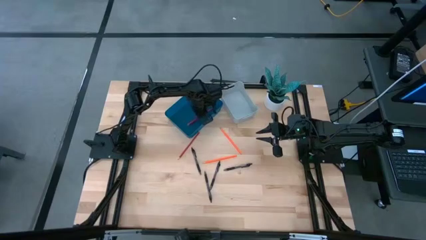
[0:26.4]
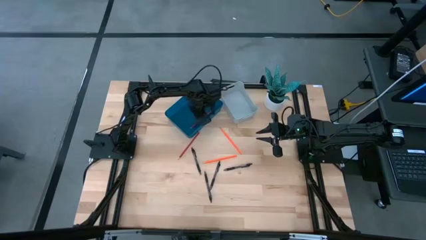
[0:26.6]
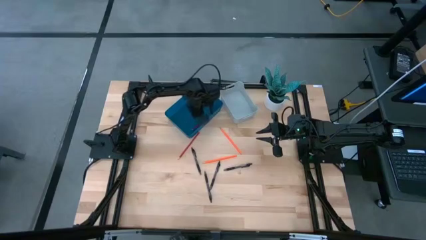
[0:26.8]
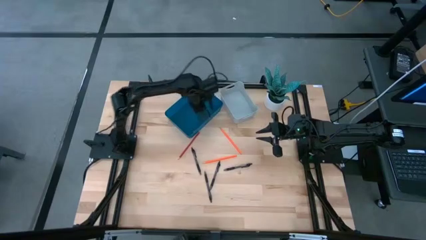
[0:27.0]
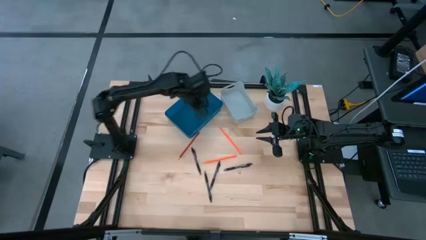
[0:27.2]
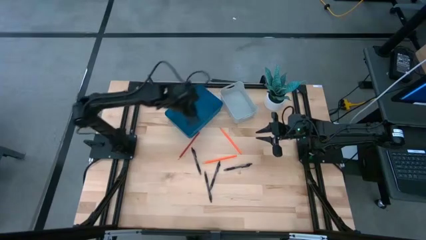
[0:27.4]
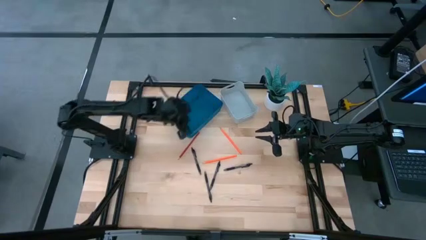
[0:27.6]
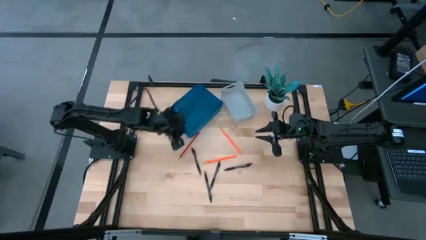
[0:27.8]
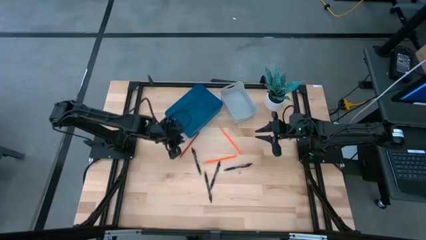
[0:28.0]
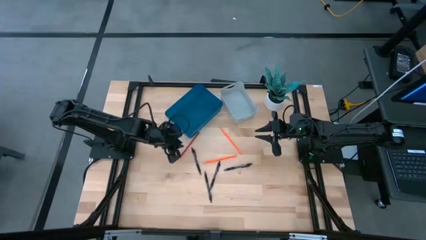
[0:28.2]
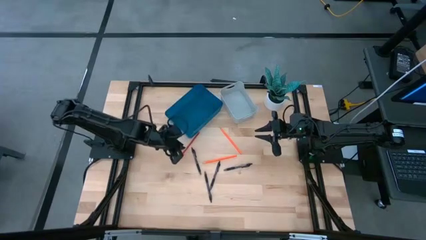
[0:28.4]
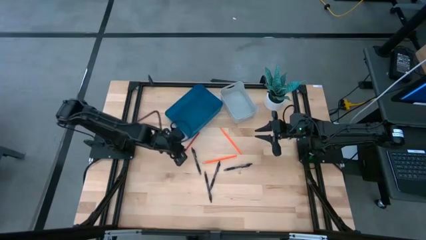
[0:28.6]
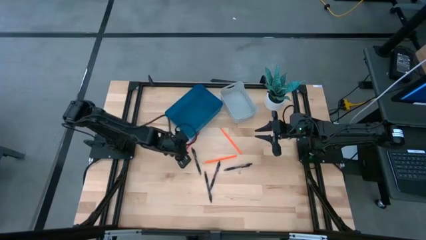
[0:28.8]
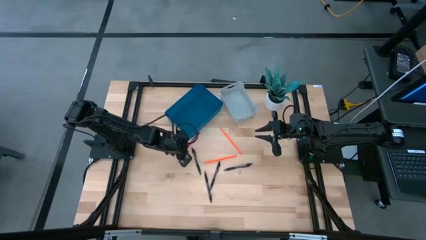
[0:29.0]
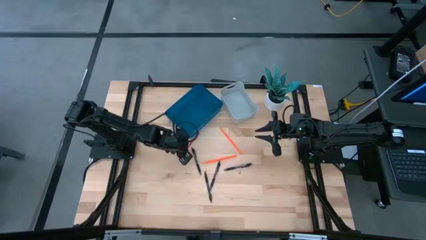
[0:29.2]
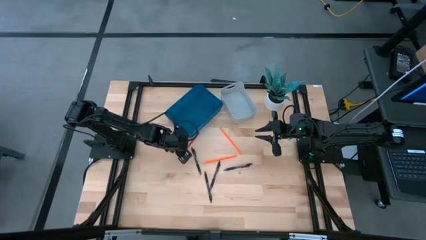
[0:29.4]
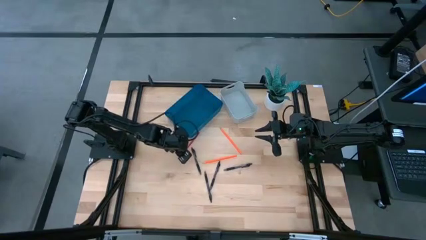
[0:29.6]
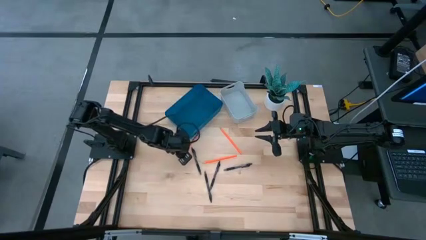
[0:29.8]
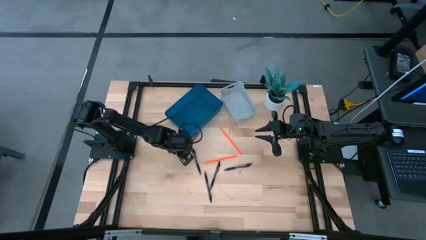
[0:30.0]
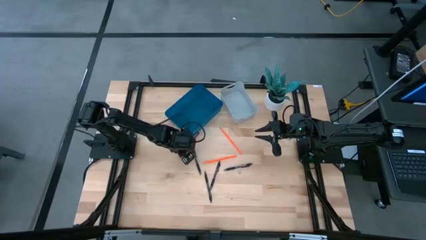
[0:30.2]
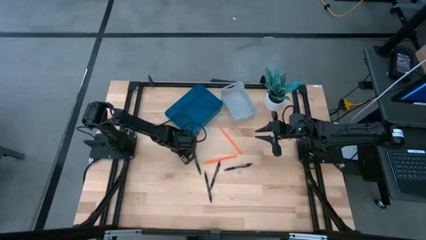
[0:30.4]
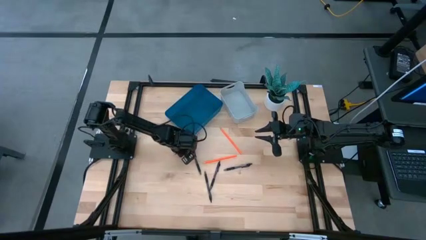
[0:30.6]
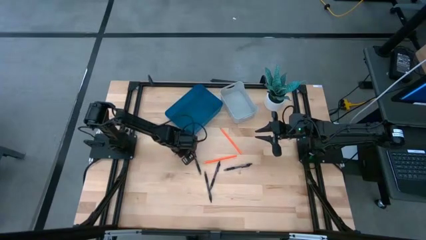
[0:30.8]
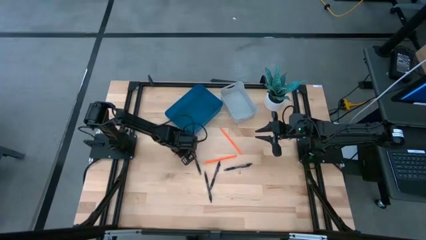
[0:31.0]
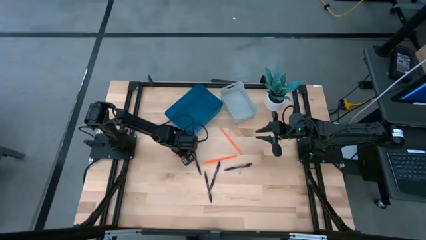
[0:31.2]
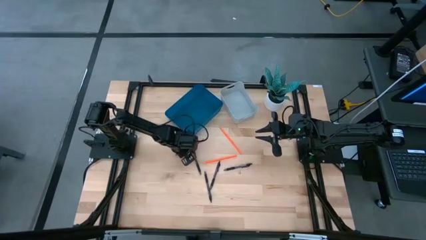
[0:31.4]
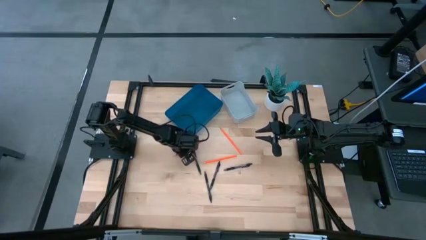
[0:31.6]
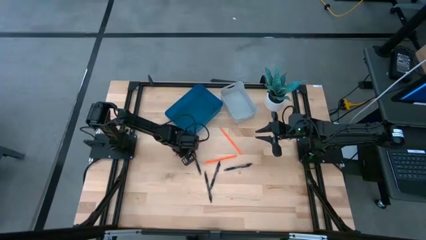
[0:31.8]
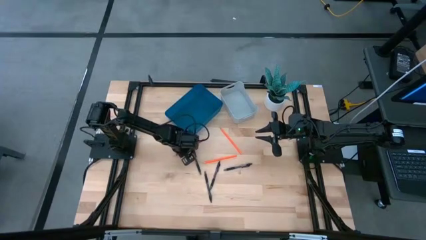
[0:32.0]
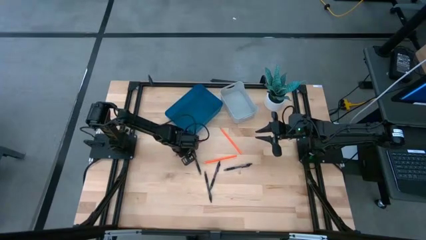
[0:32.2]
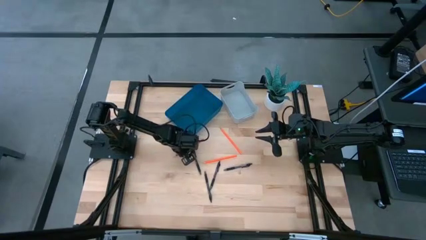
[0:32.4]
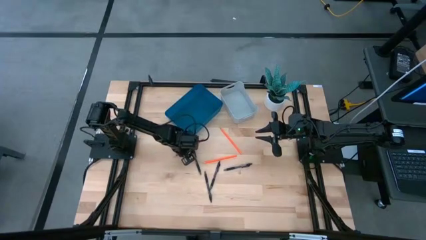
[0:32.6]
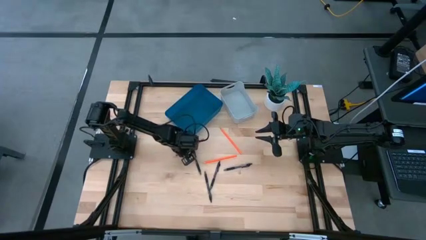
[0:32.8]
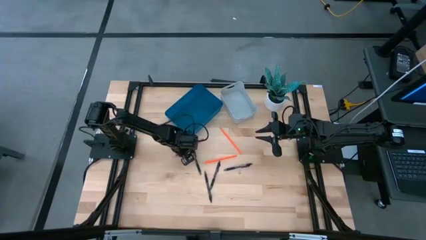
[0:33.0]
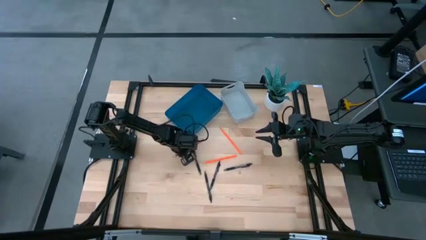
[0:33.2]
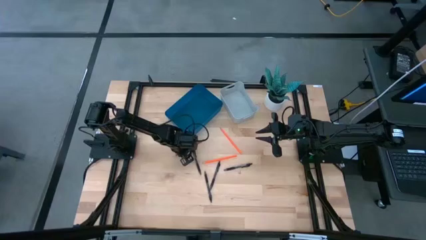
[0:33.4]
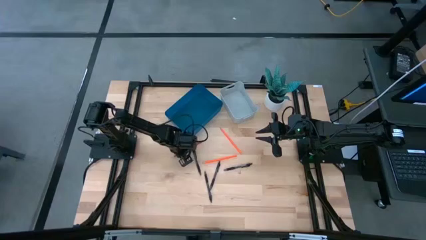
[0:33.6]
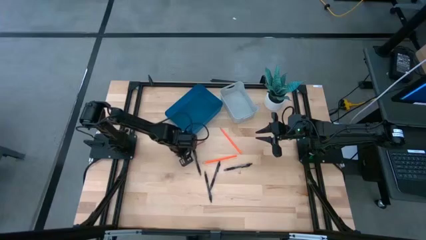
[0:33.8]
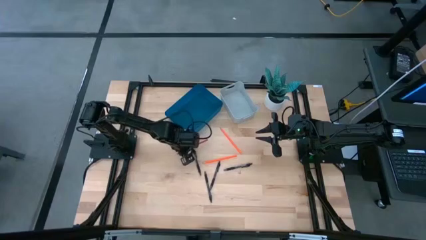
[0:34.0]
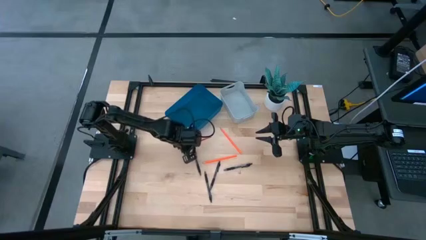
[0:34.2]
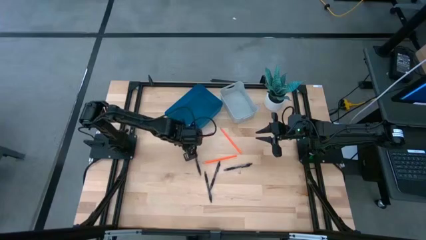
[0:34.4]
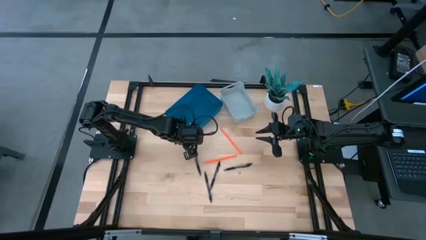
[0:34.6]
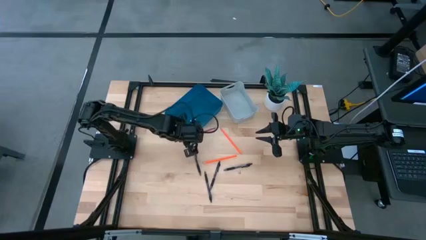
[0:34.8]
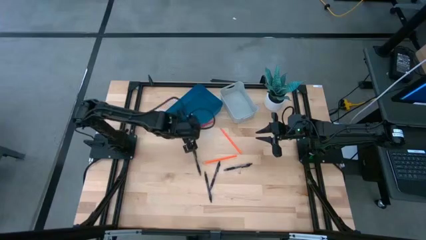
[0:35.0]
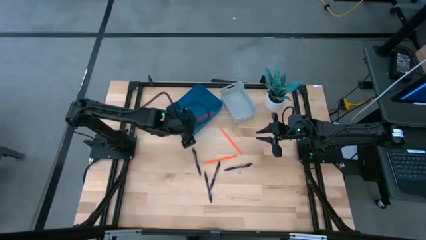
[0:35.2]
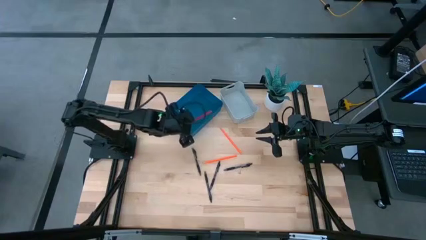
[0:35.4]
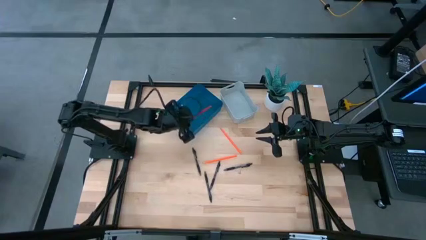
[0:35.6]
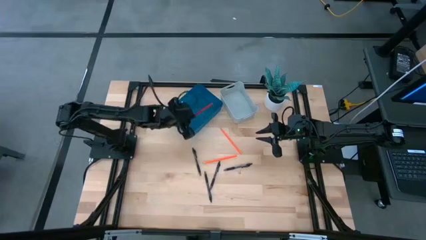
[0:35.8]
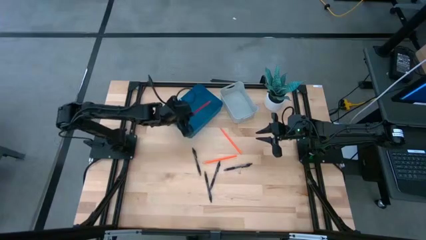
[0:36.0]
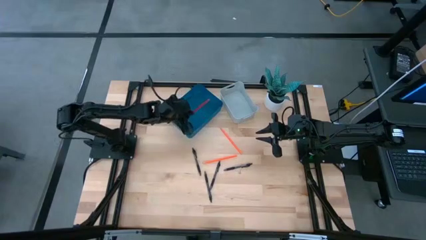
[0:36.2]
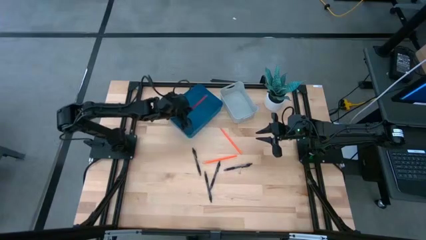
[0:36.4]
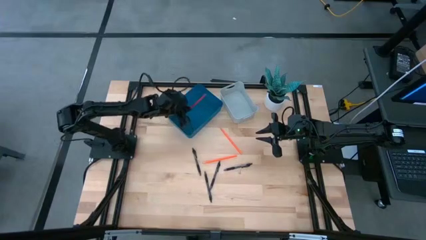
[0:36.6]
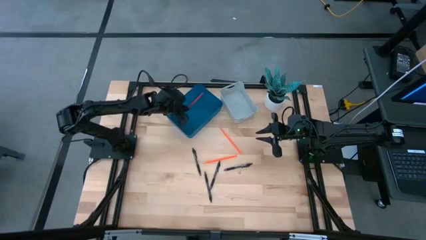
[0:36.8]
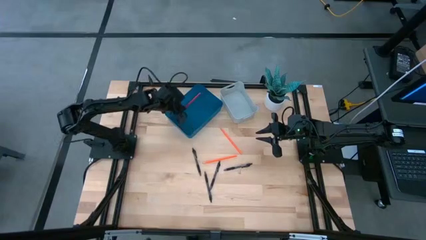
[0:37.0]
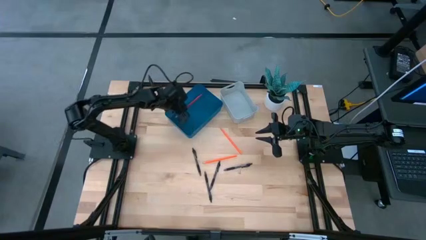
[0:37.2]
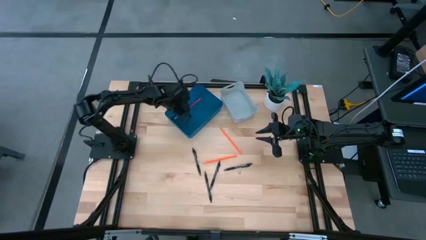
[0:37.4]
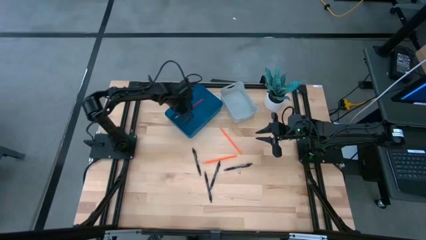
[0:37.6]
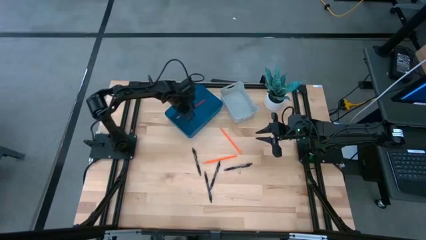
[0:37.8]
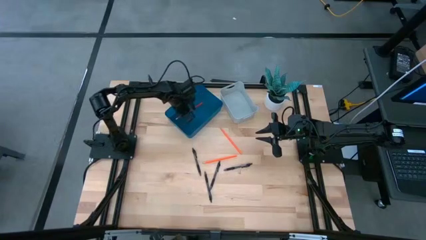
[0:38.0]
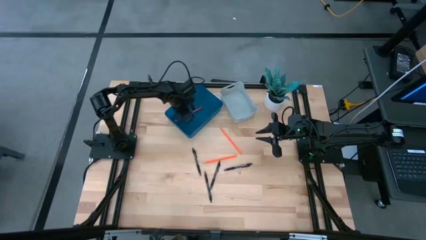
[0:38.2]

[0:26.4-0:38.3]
Task: Sort pens & pencils
Put the red pencil into the blue bin

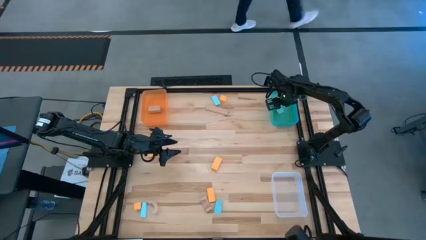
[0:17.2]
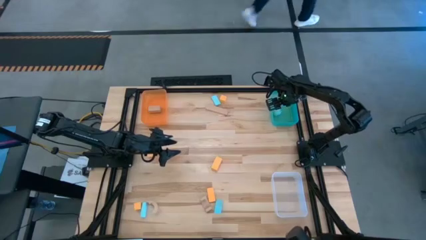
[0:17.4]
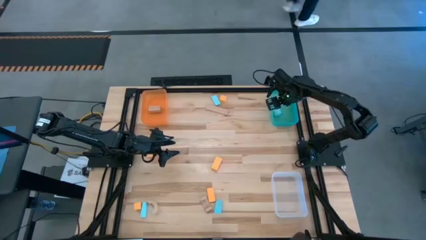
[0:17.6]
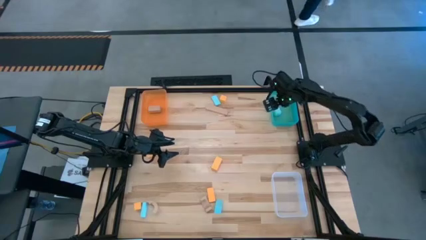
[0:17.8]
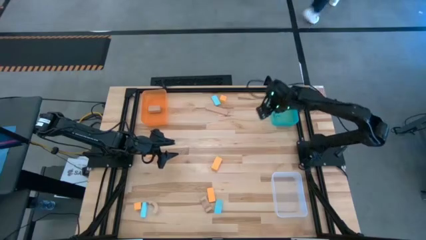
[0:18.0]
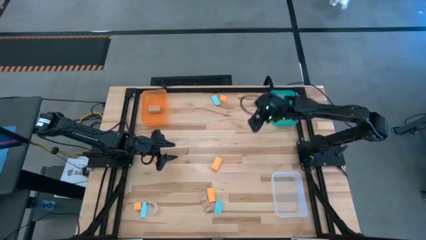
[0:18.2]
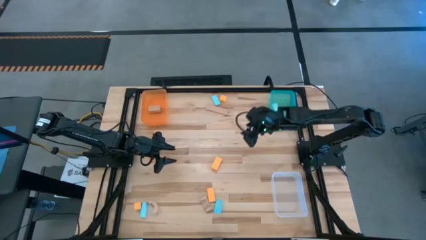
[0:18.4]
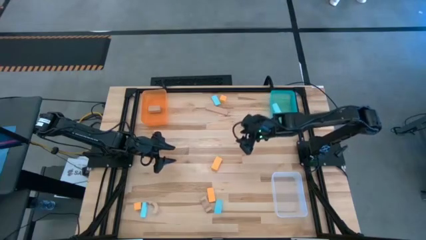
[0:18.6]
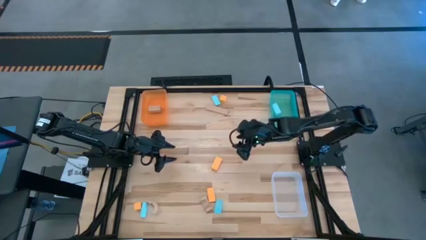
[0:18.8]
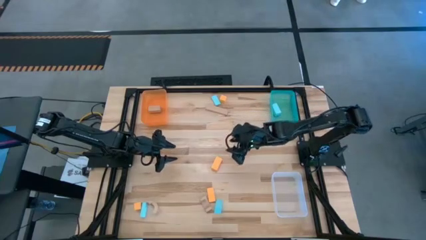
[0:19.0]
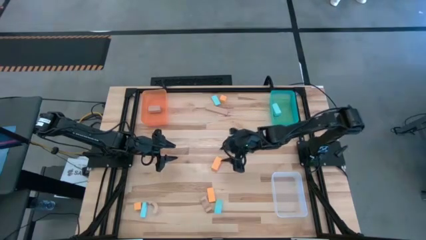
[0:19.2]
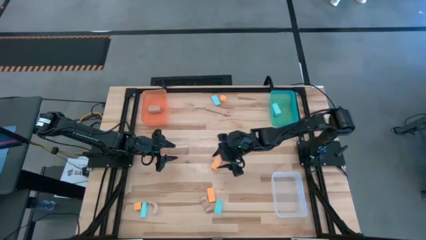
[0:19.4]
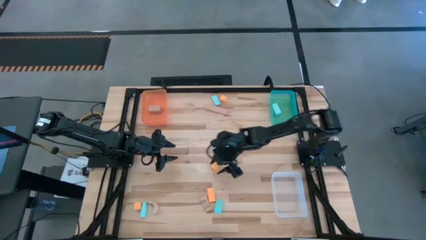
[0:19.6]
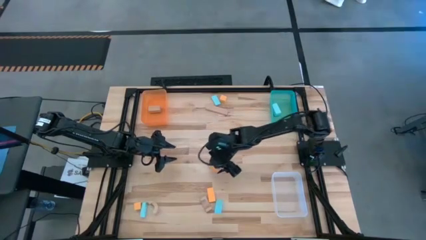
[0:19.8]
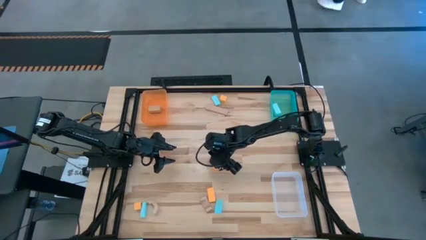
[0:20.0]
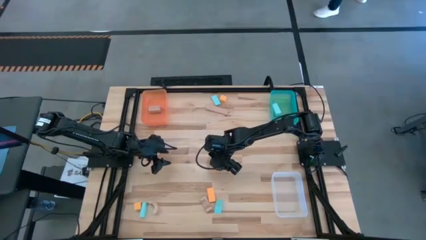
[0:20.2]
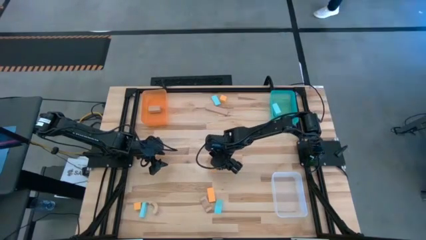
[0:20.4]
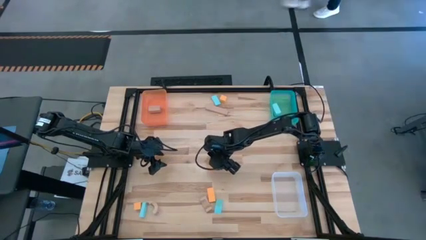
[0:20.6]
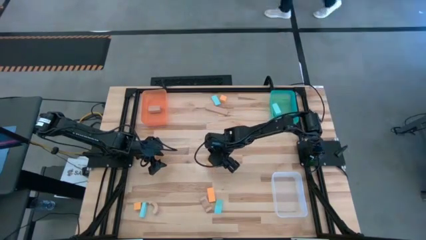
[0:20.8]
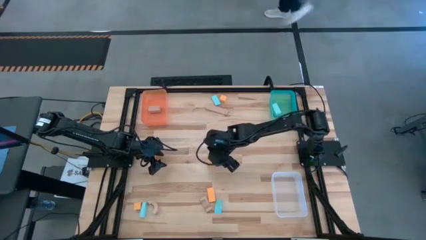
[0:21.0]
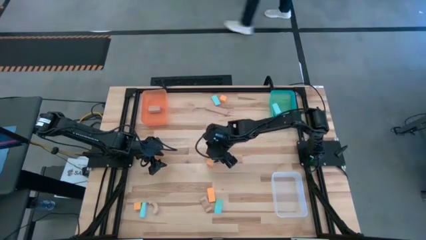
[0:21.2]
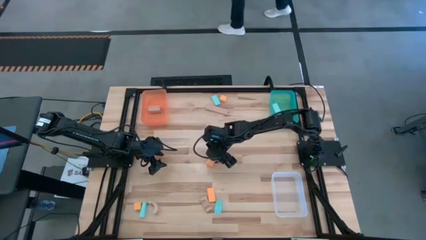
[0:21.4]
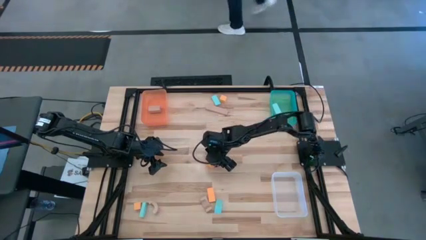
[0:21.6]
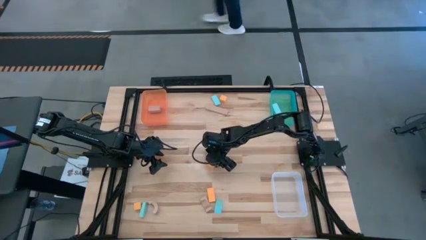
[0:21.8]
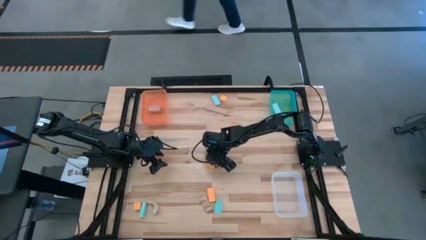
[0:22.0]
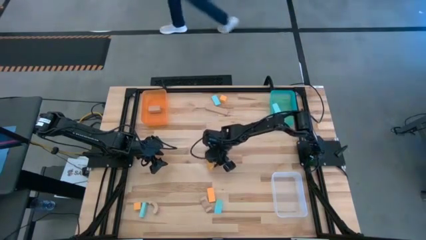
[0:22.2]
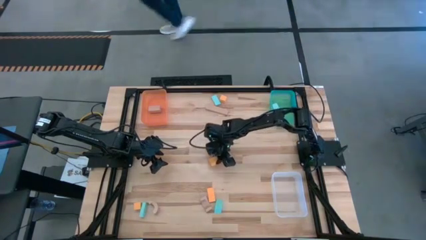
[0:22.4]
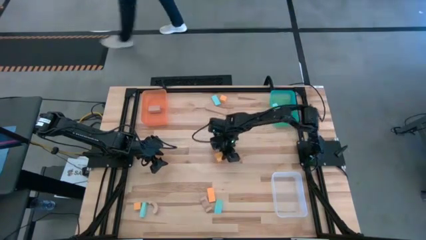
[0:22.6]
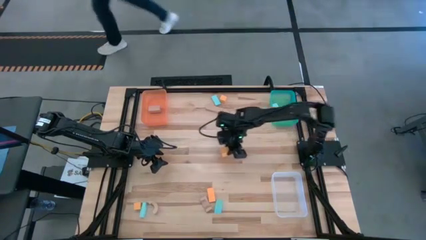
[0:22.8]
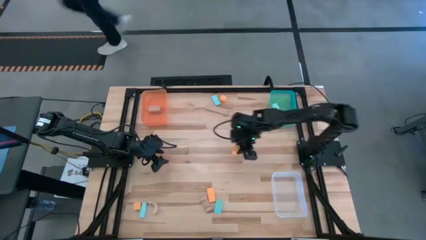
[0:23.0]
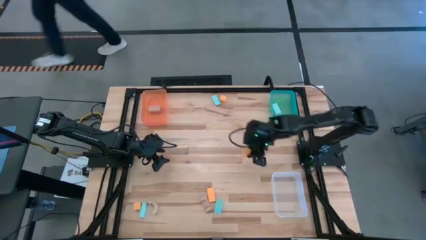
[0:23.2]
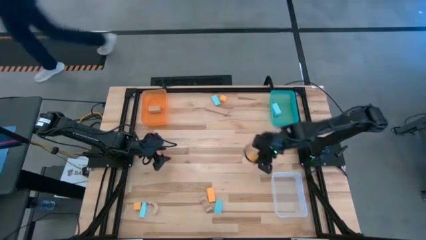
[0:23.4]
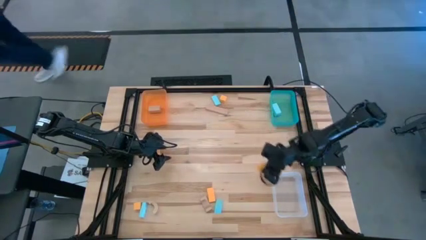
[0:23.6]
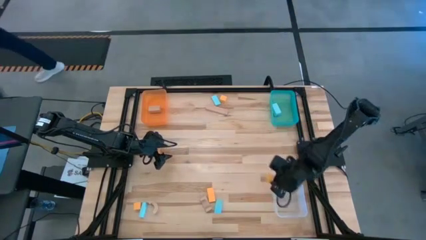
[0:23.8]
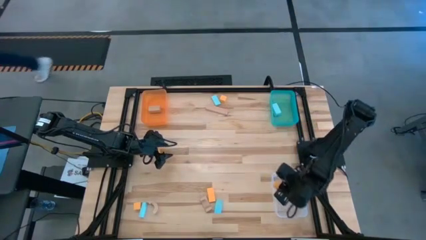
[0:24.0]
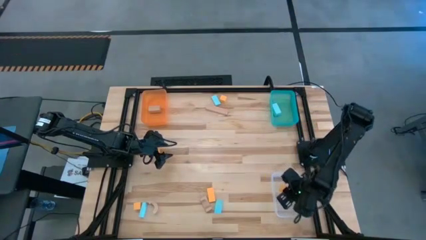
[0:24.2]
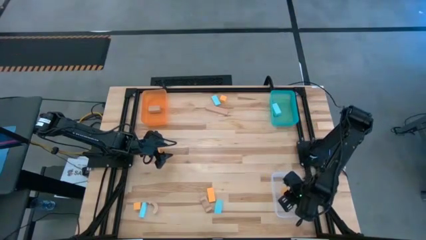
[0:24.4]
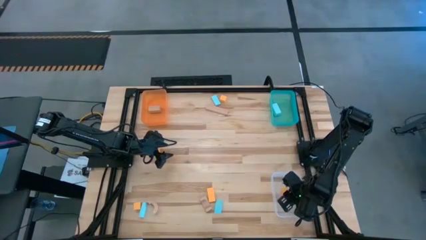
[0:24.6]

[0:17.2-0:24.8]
Task: Sort & place blocks by color
Put the orange block into the white bin
